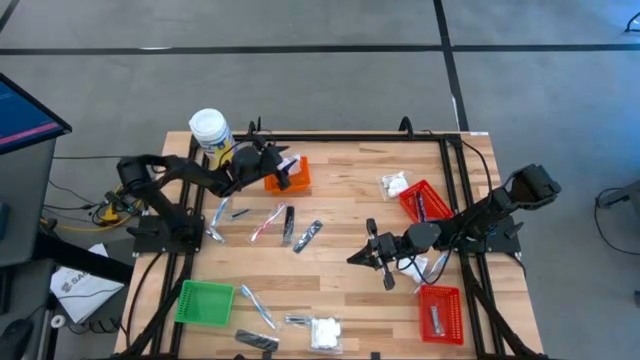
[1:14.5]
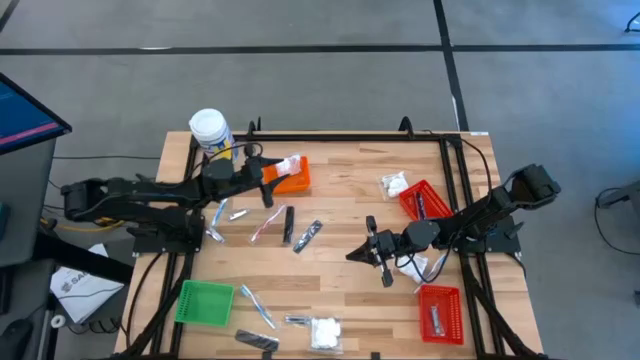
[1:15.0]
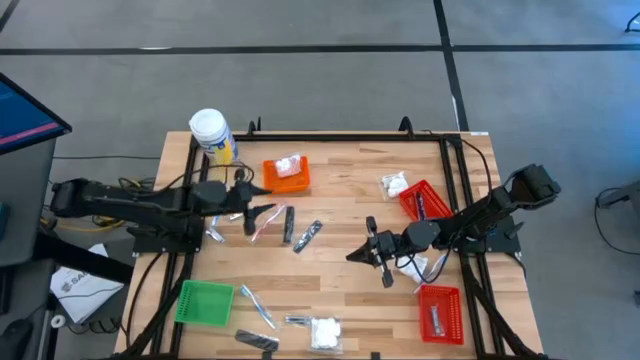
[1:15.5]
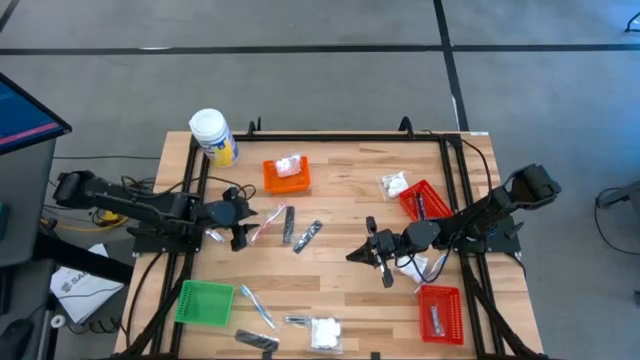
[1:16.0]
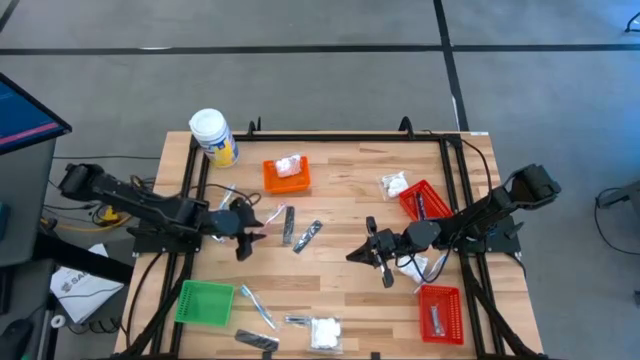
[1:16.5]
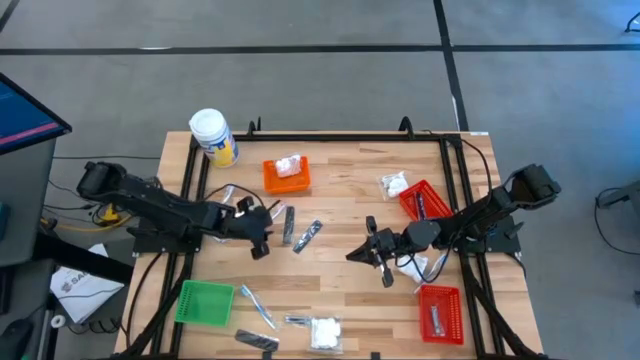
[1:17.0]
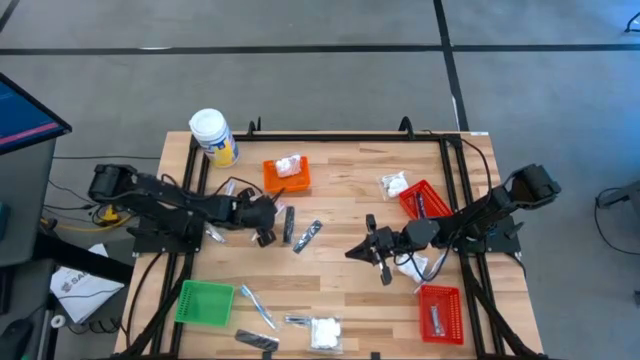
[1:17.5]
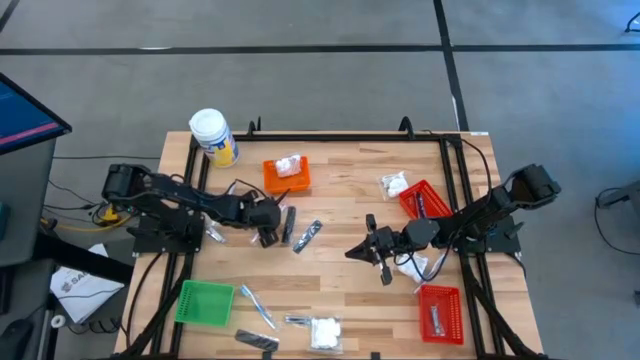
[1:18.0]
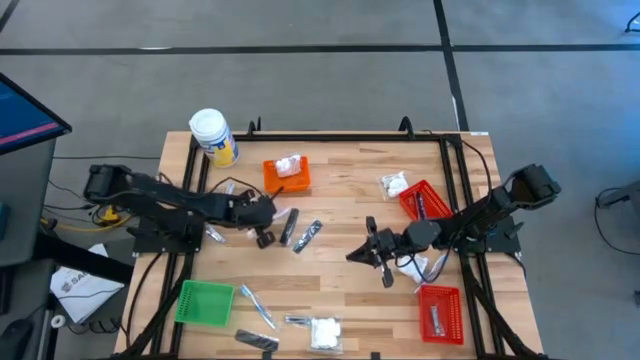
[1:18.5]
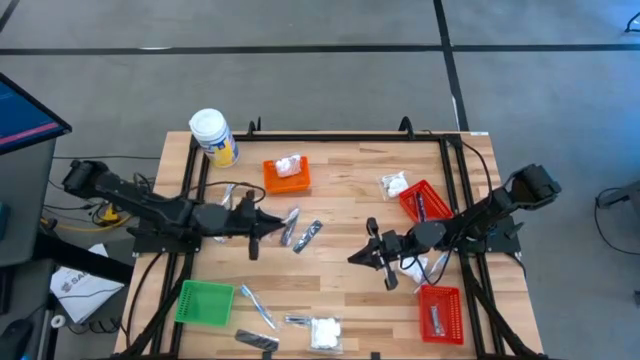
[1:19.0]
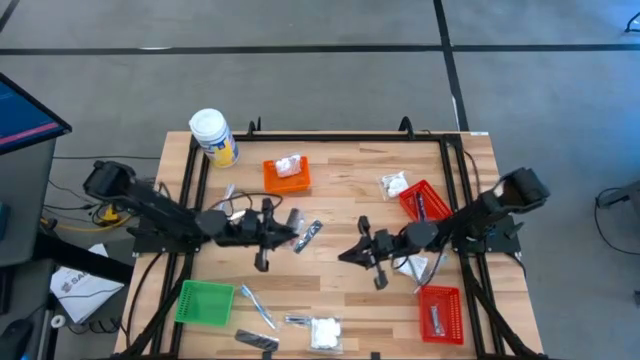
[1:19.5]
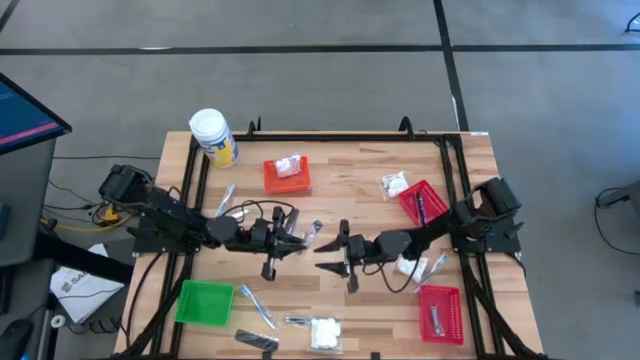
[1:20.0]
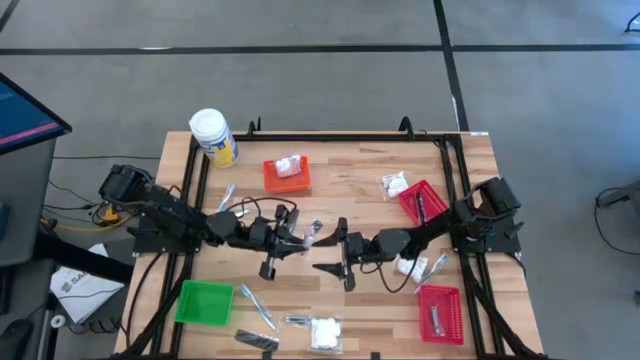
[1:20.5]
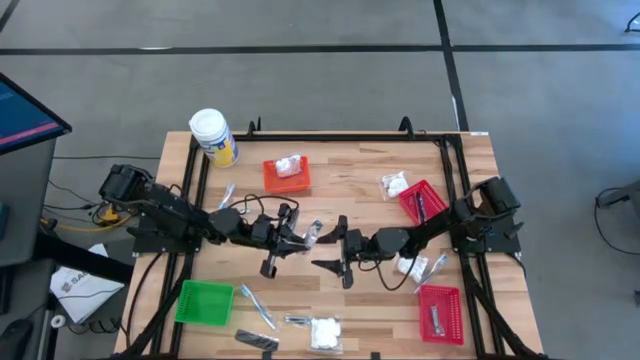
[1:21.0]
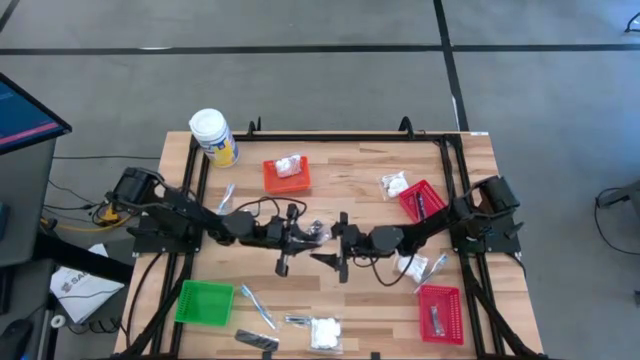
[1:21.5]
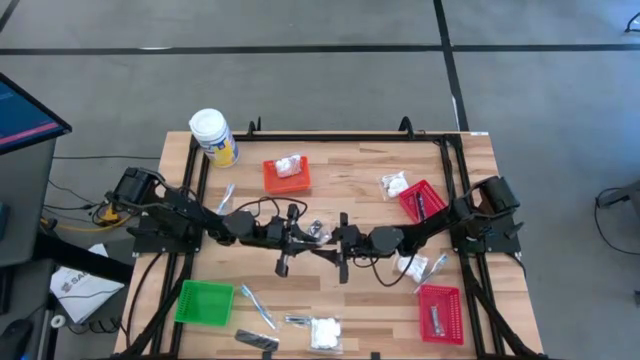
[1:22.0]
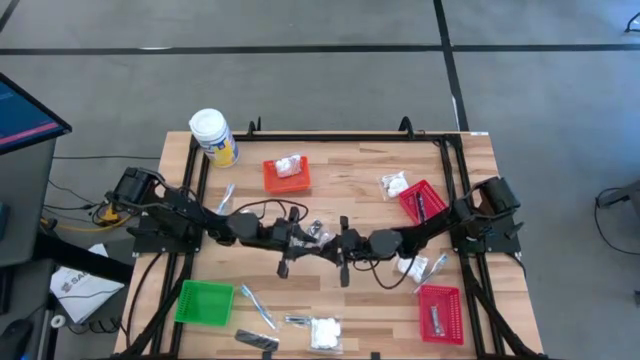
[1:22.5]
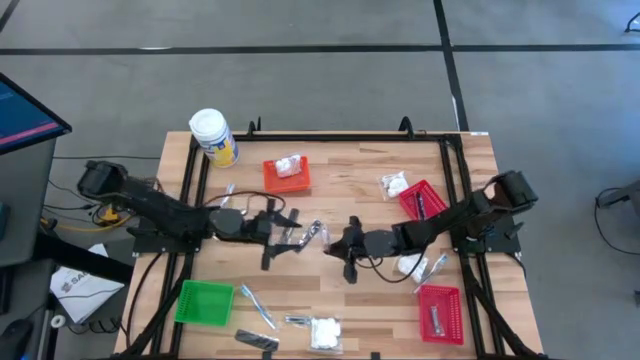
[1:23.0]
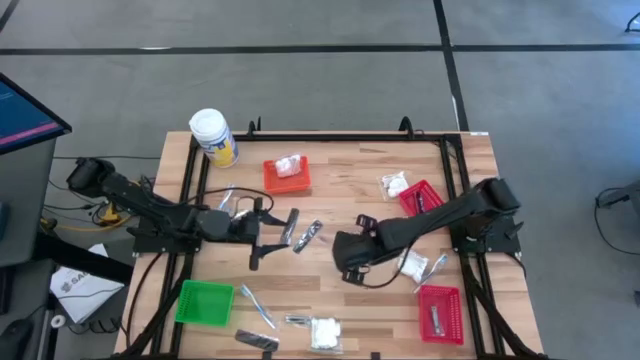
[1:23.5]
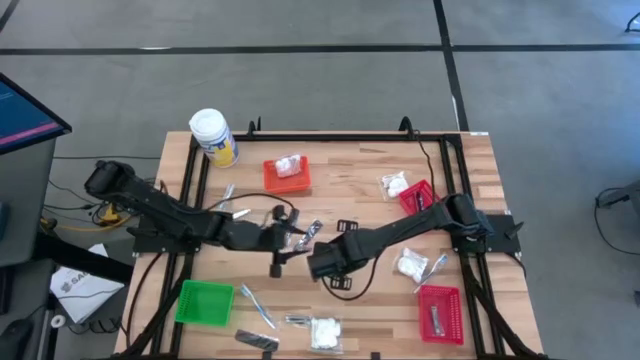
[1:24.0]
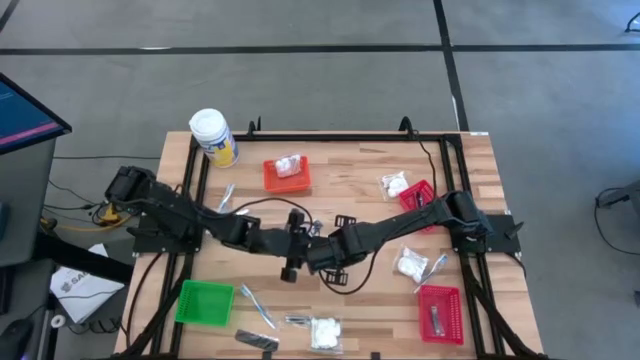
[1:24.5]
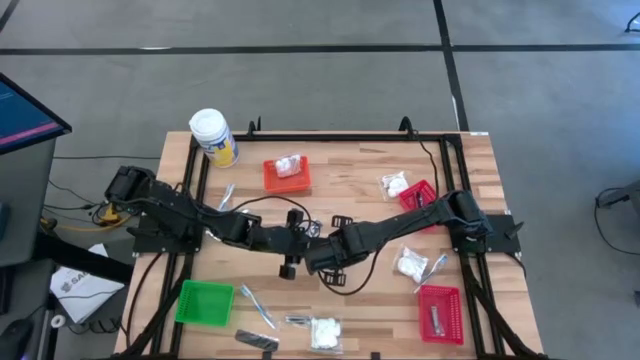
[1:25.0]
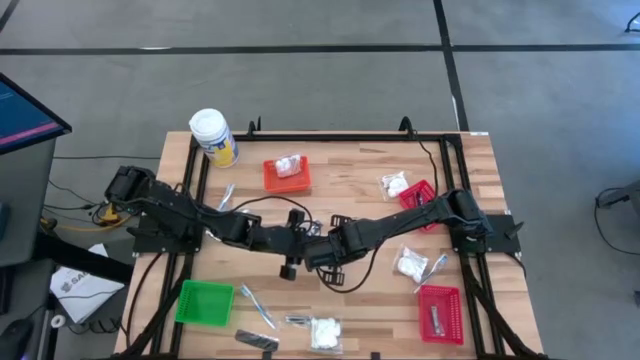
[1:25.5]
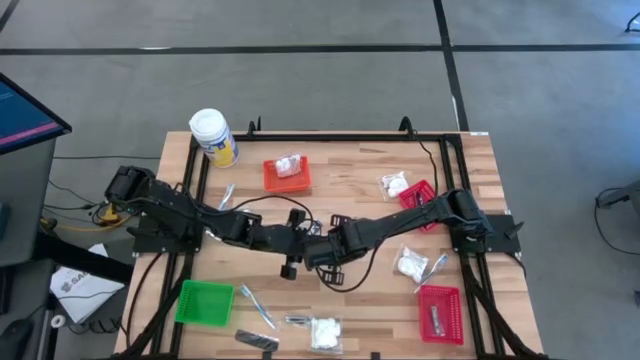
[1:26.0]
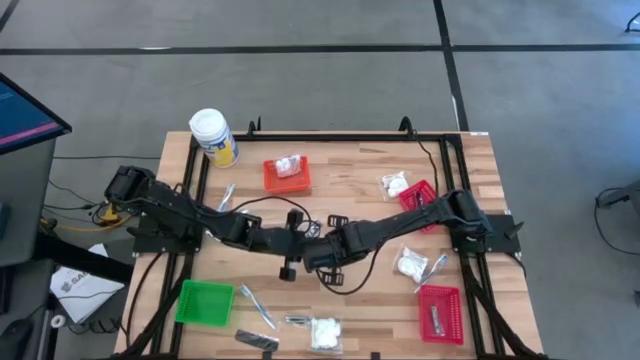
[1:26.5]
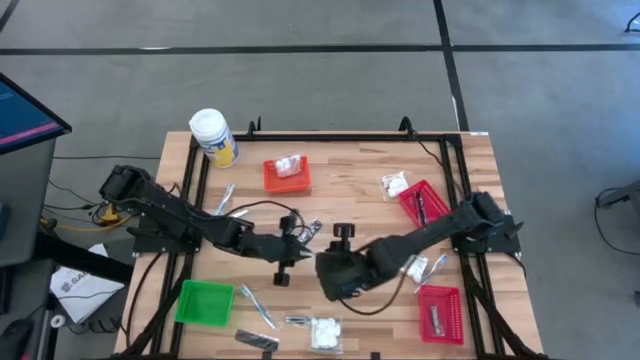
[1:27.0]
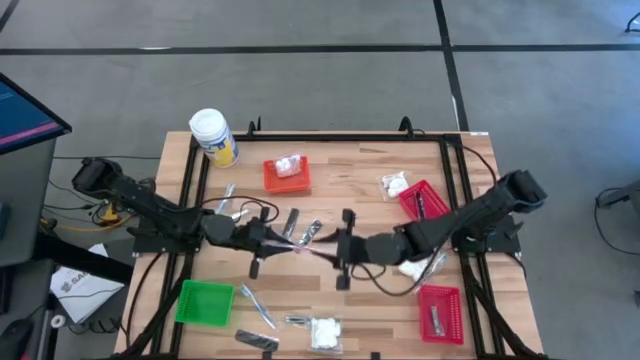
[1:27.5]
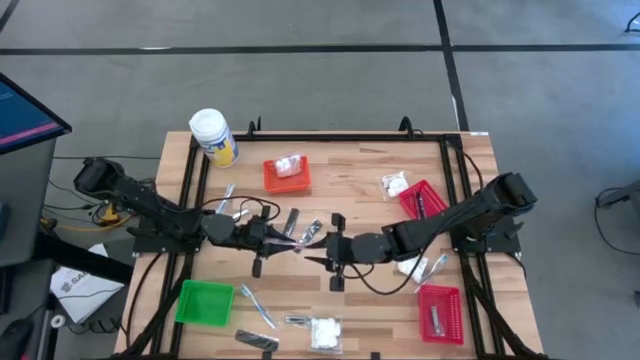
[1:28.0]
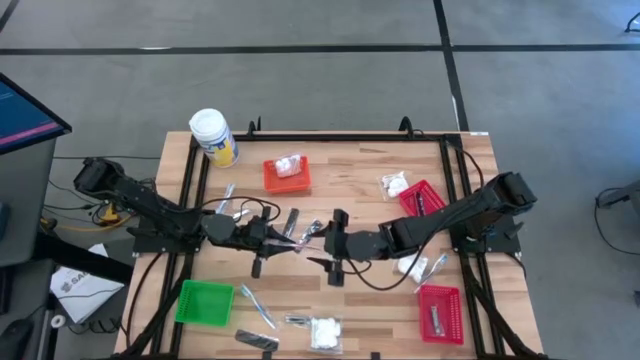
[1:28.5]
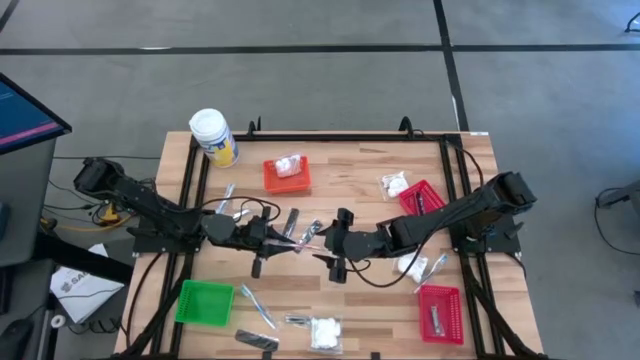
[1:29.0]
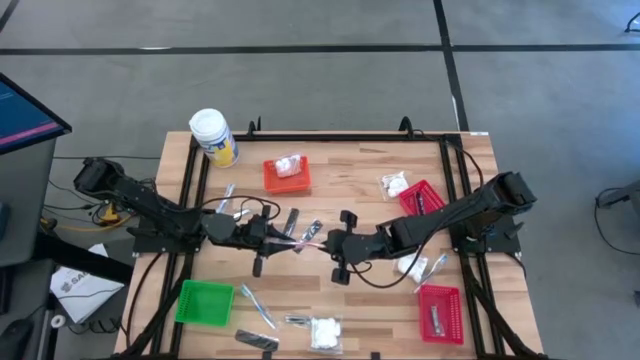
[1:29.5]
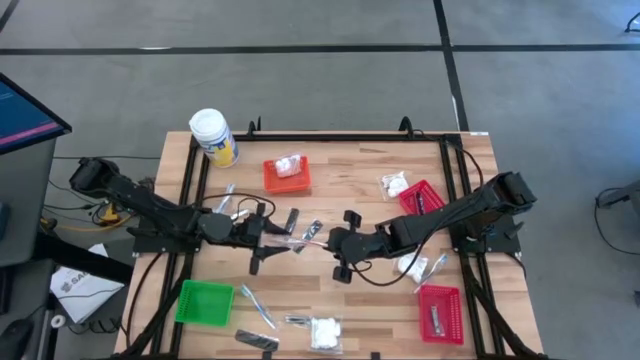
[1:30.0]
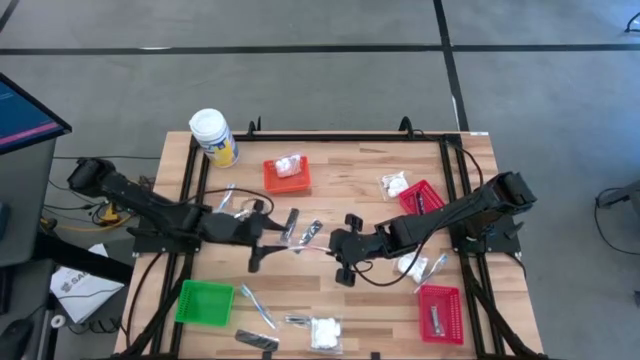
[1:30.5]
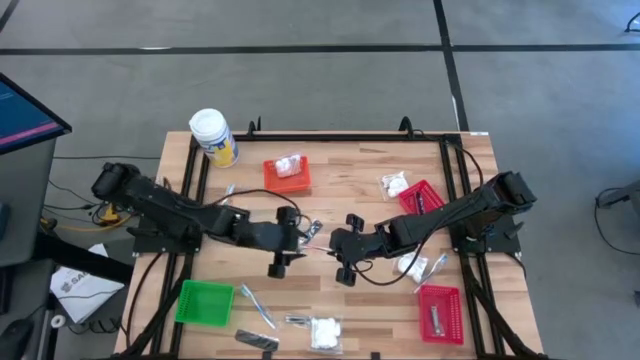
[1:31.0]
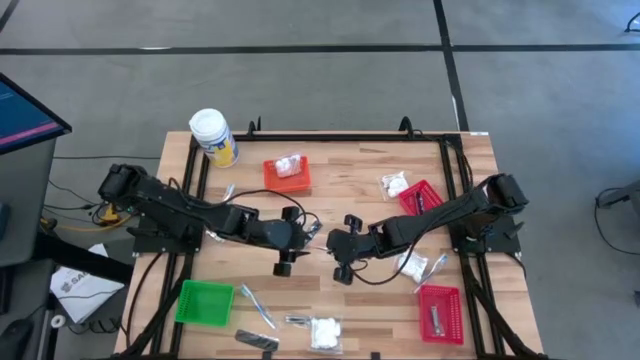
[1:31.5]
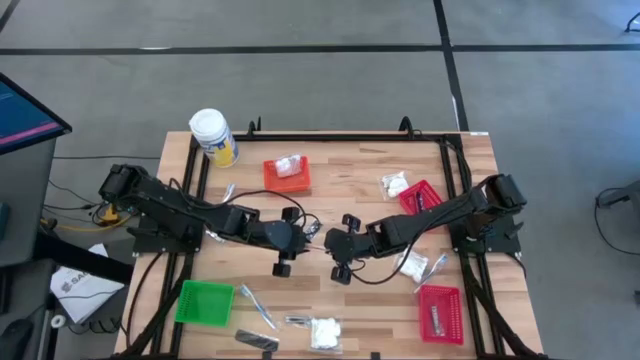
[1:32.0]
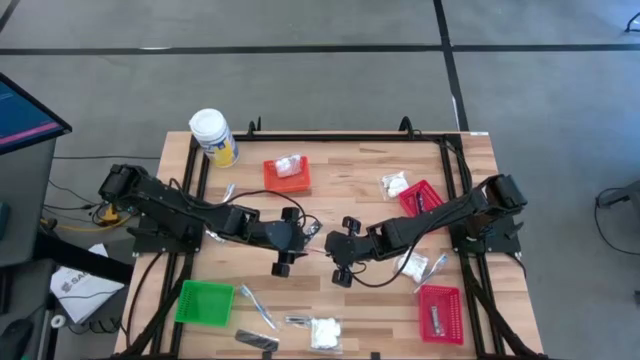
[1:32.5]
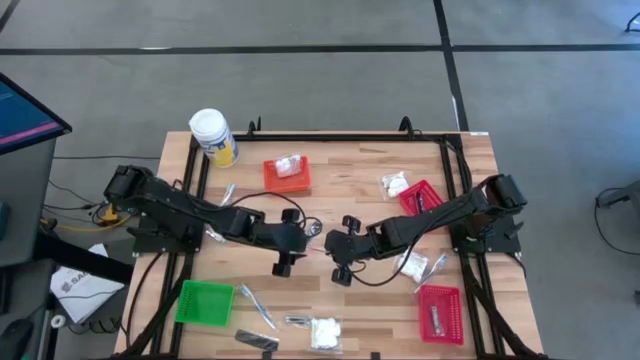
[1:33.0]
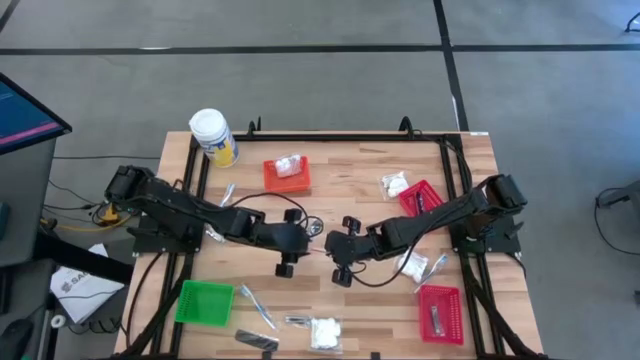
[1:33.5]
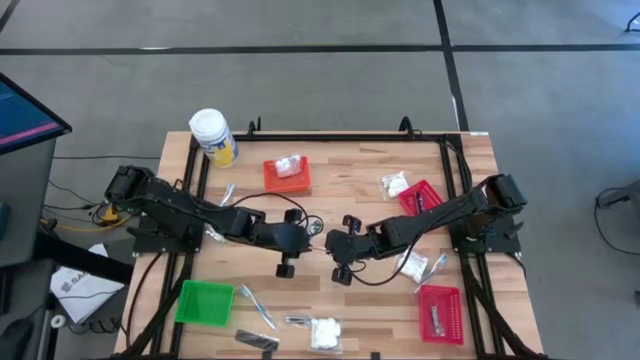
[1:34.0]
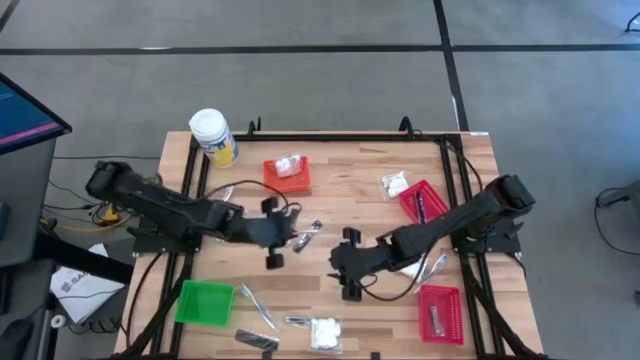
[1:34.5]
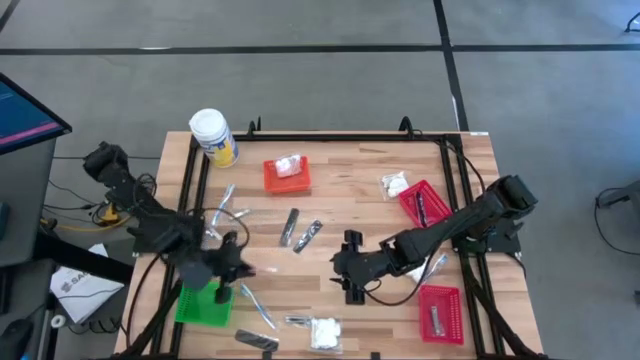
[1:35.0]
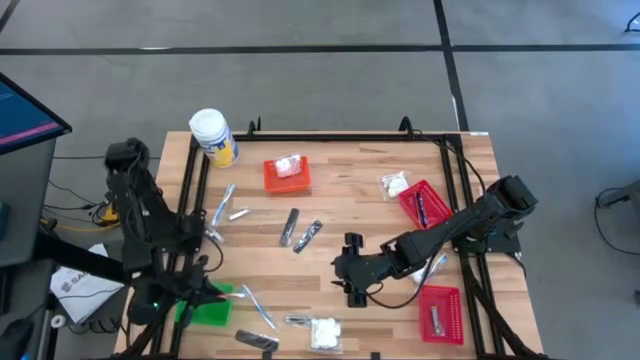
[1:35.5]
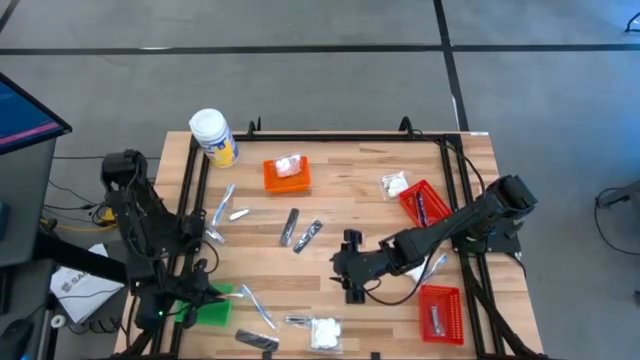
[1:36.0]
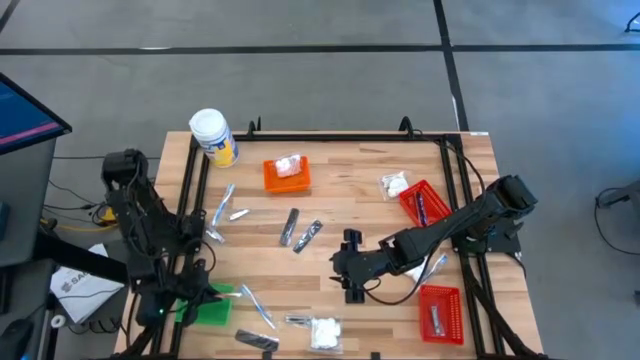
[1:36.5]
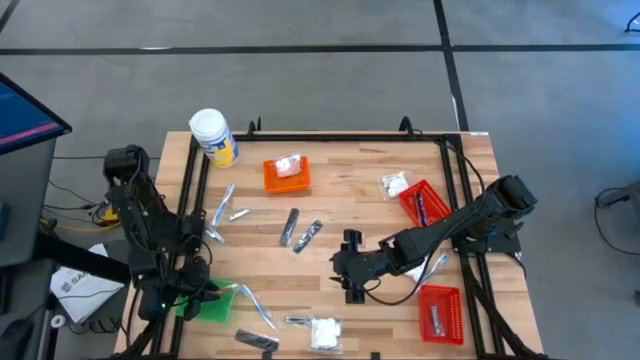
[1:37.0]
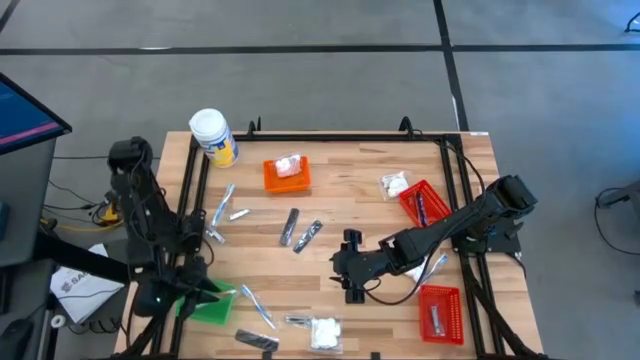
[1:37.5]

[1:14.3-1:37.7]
Task: Pick & Place Travel size toiletries
Put the red toothbrush into the green basket
